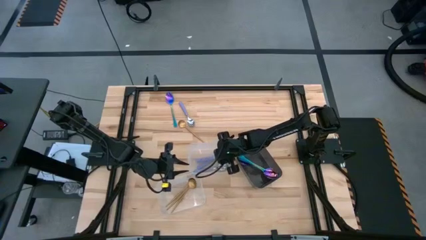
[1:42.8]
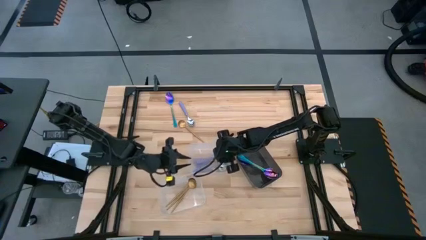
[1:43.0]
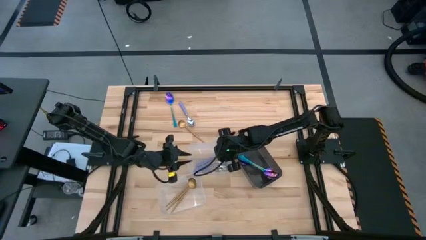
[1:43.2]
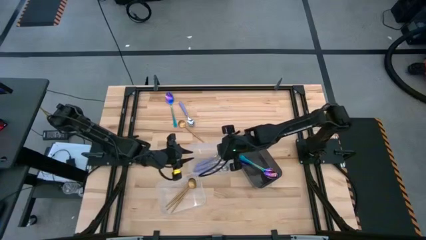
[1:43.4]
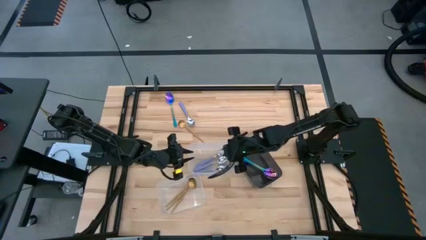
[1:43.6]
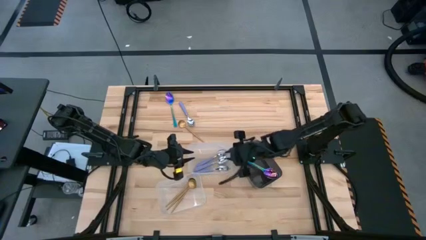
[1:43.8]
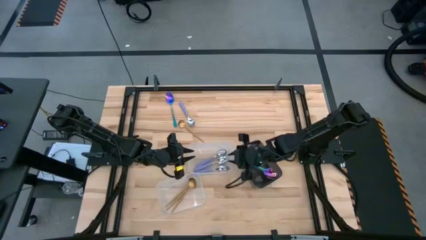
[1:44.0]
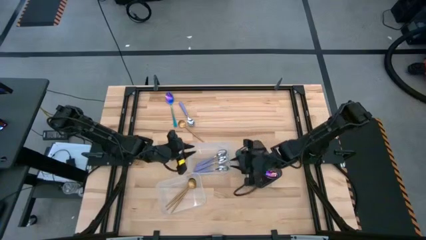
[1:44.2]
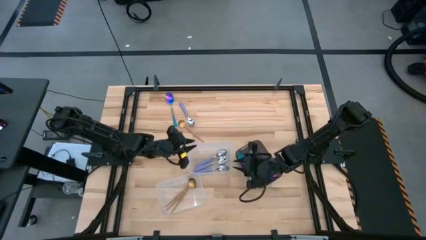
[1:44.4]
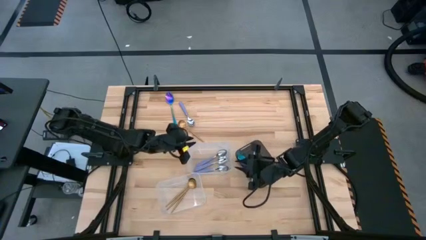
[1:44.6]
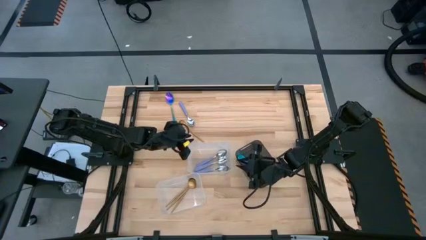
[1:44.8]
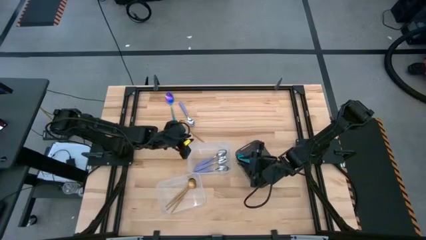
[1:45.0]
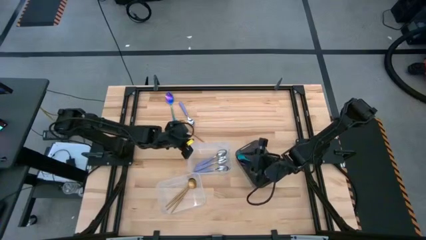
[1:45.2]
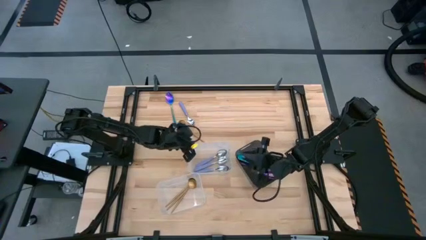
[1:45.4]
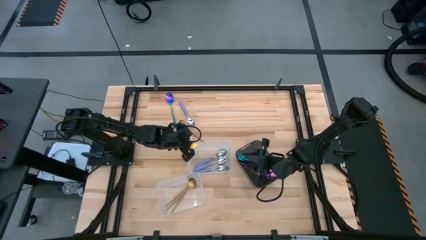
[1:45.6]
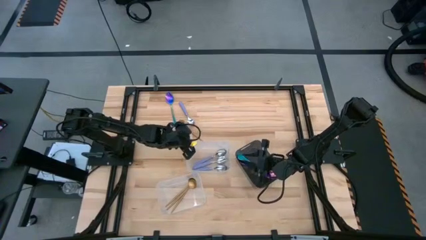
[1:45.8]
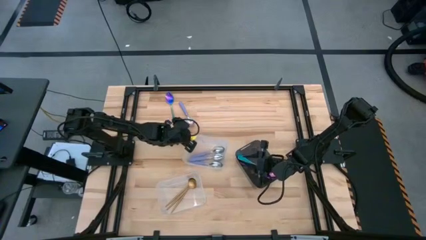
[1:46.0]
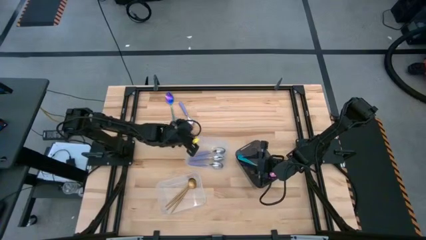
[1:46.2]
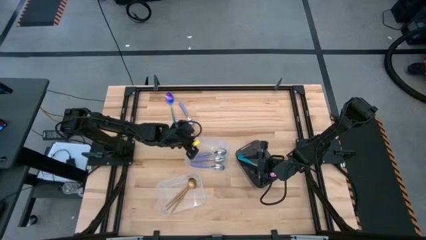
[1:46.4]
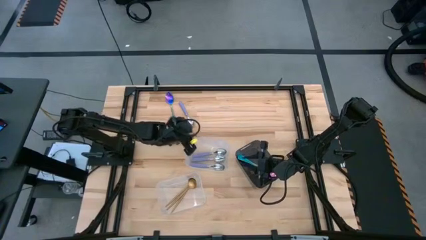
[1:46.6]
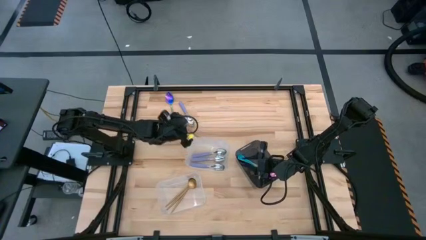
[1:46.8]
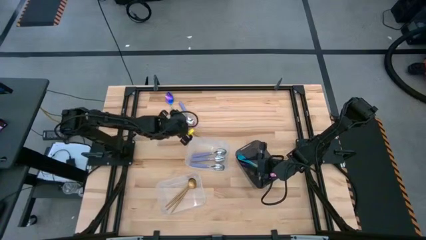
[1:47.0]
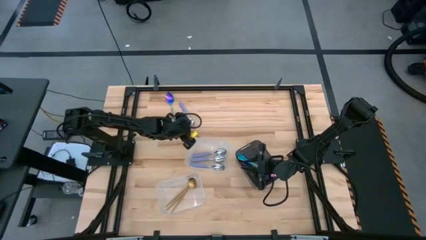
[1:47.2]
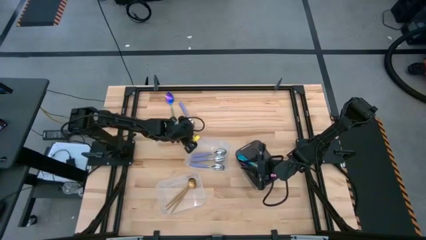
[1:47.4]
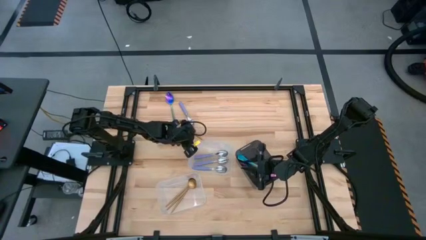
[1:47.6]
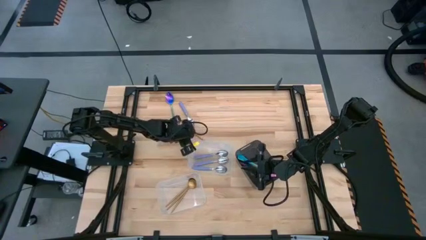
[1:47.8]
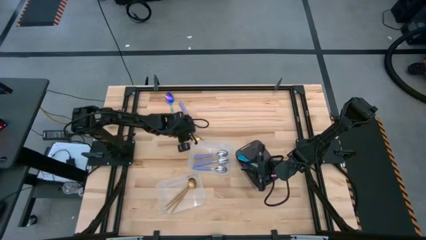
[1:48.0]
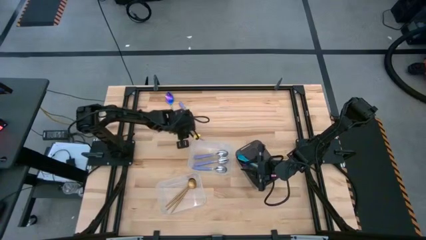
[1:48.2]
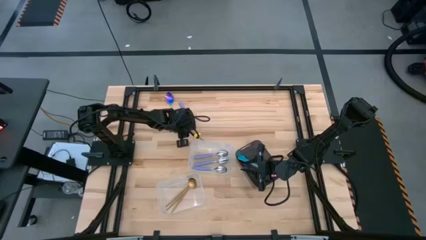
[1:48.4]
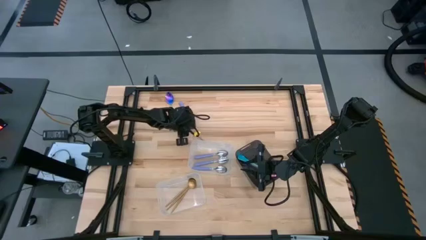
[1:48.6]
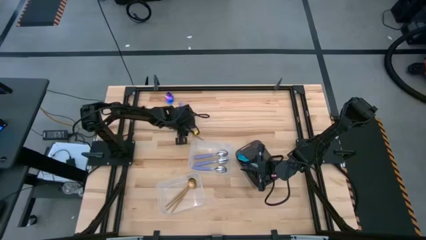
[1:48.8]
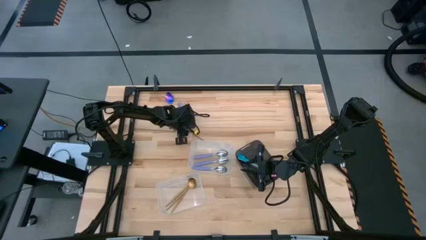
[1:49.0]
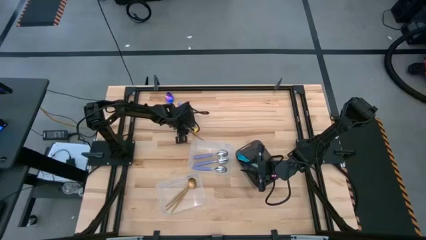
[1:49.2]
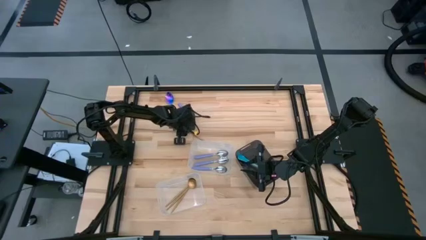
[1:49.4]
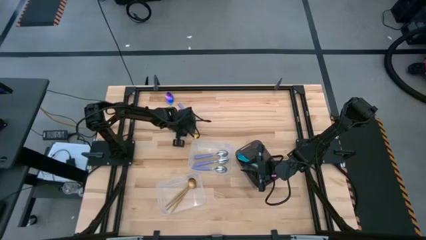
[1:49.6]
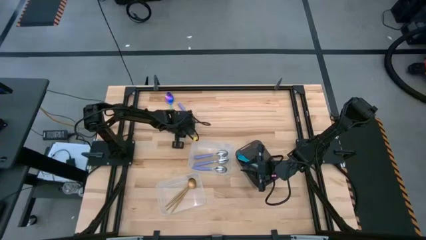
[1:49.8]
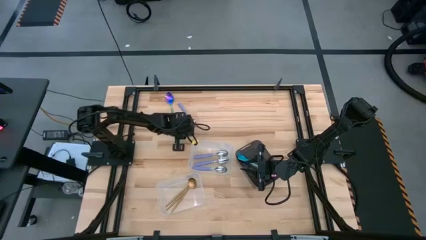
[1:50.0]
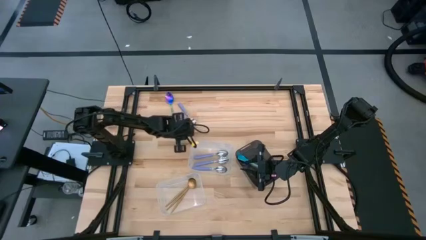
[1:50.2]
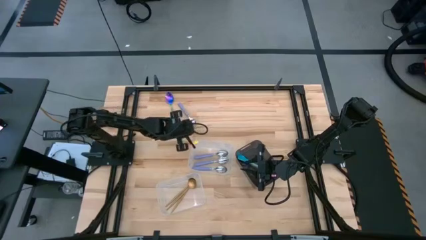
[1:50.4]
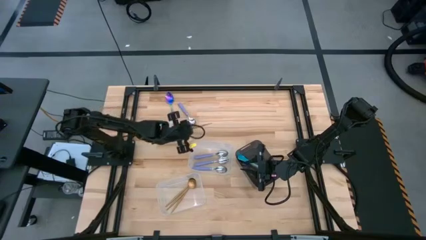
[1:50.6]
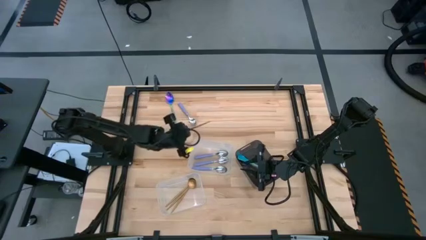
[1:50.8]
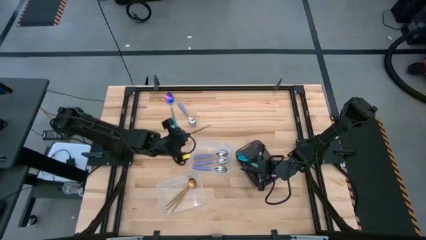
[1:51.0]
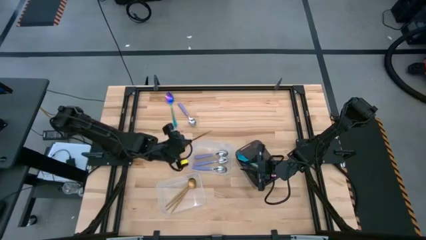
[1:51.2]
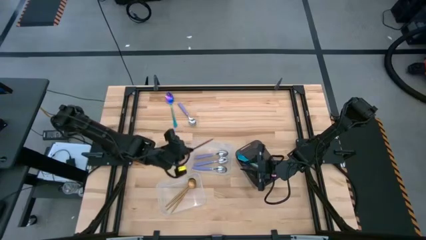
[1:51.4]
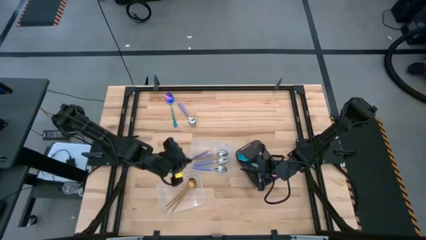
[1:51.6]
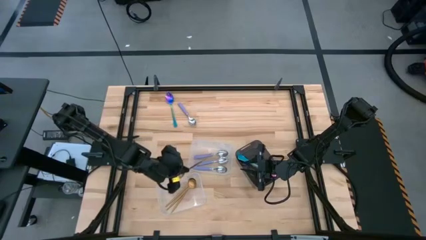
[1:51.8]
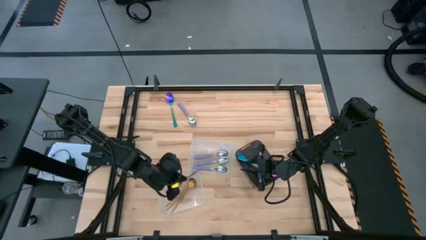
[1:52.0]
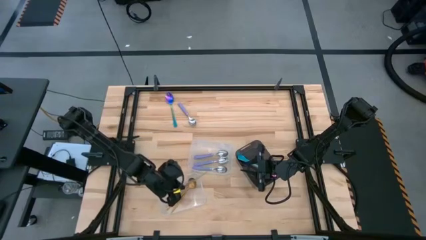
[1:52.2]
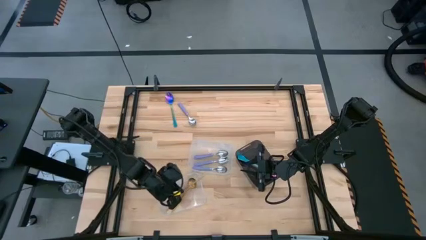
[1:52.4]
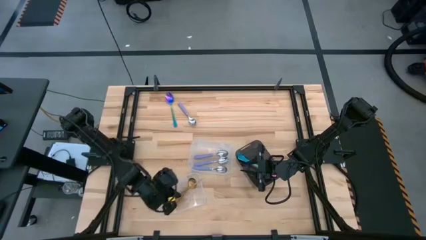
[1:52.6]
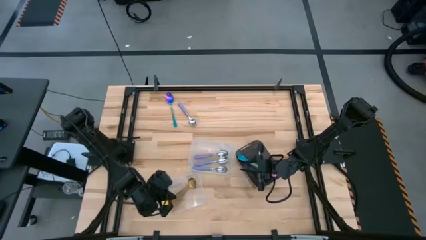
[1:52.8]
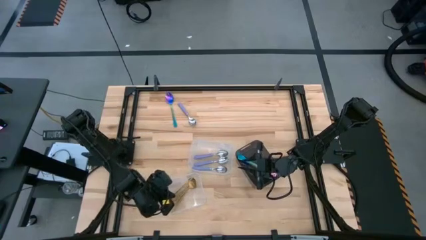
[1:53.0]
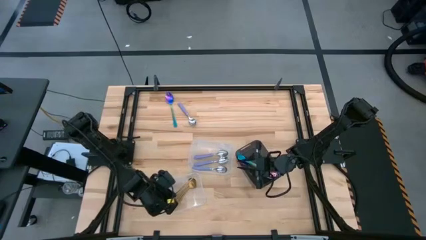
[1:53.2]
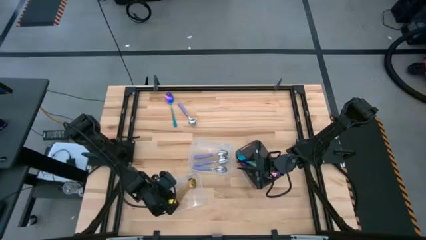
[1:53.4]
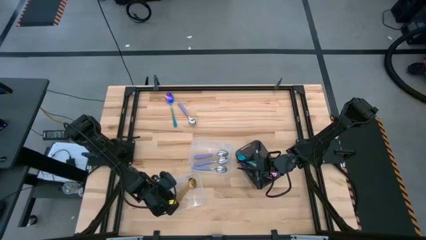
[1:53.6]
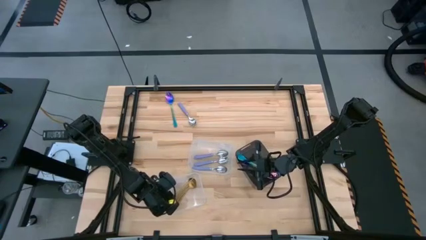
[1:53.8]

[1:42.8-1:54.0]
Task: Sort silverware by color (type)
Put the gold spoon into the bottom transparent bin

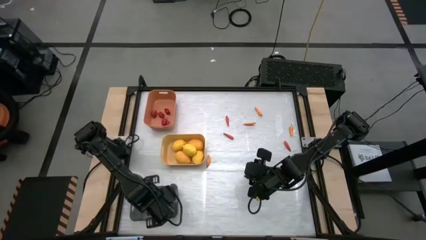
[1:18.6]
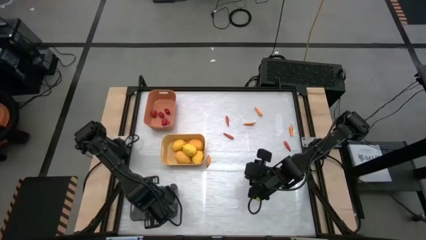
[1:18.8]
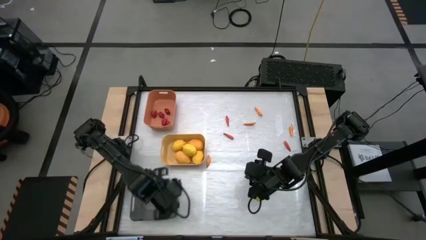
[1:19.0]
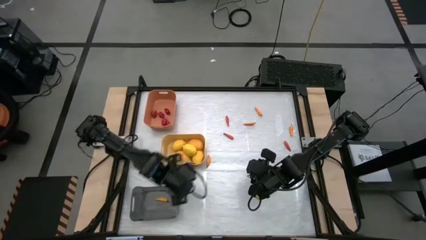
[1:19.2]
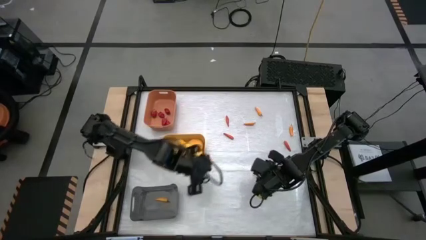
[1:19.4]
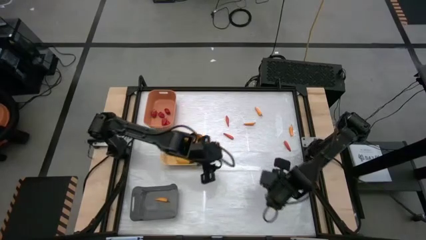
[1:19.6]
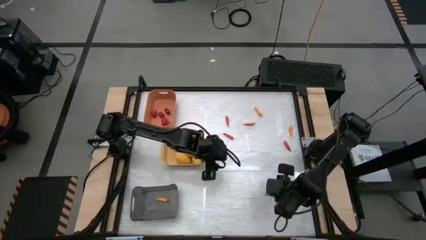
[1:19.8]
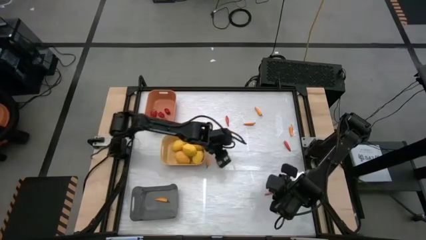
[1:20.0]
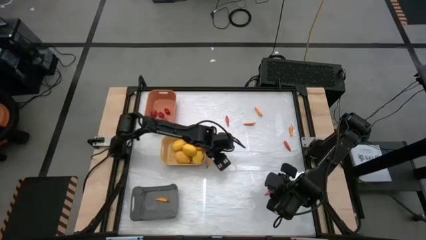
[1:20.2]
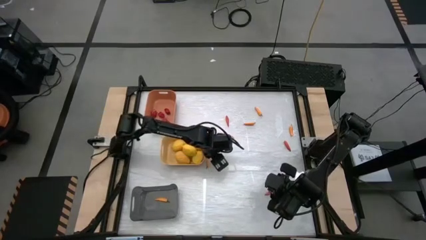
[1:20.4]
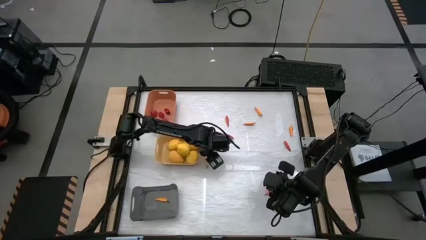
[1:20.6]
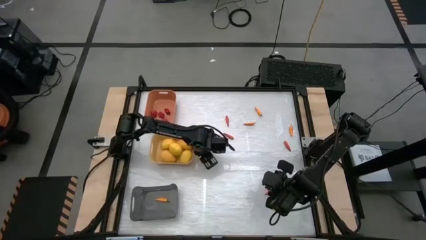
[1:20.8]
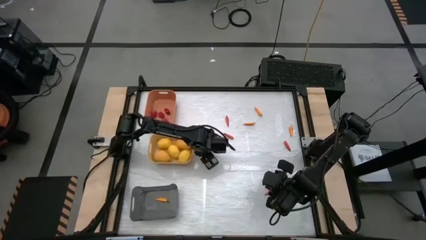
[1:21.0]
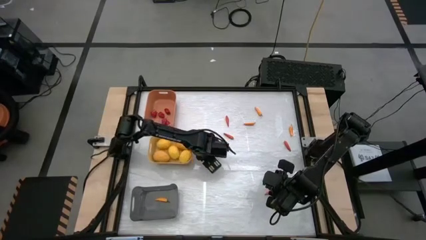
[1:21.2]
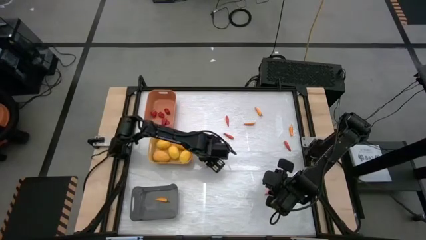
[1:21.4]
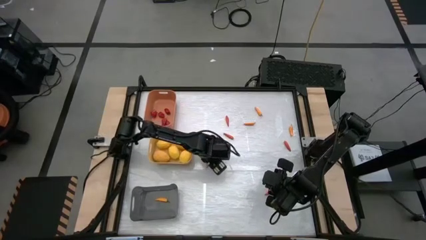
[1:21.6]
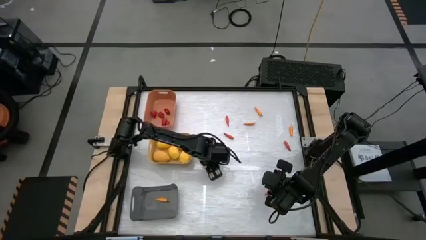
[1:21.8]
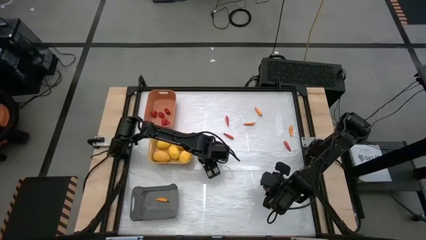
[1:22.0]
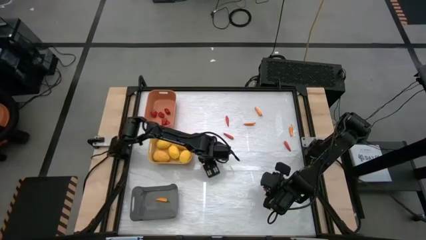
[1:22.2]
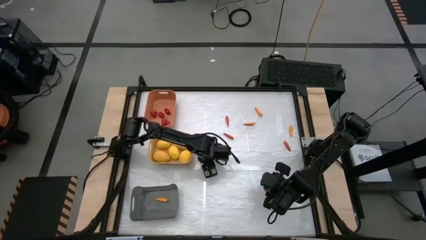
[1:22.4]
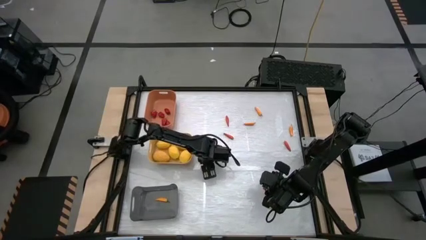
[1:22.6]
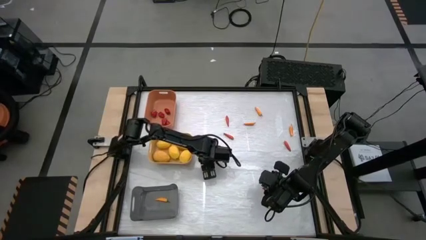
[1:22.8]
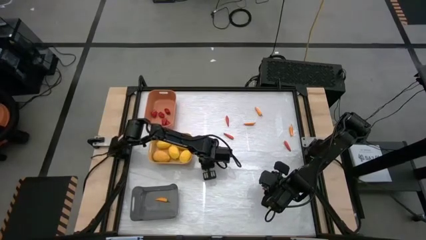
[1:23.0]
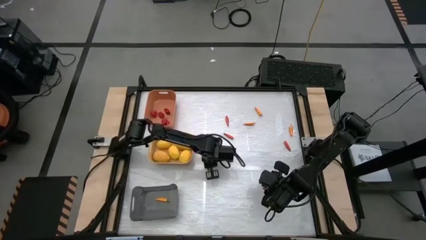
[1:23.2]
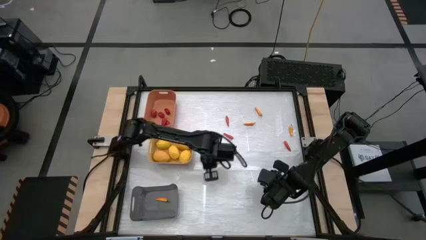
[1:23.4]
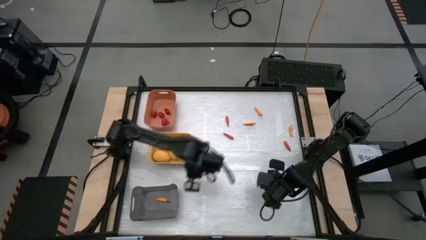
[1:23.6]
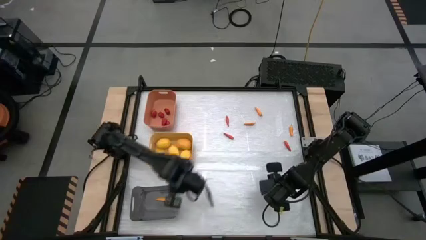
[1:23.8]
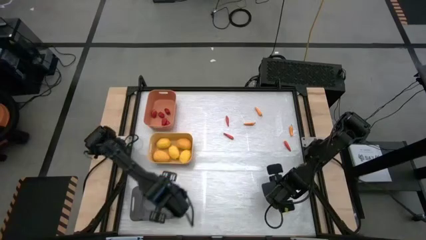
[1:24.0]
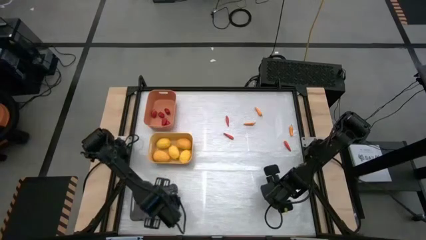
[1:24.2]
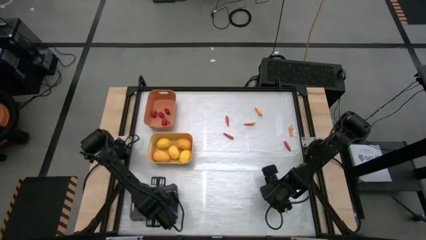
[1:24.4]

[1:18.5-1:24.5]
Task: Sort produce into baskets
Put the yellow chili pepper into the gray bin
